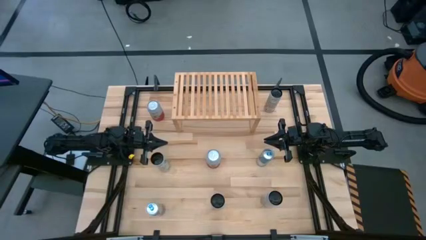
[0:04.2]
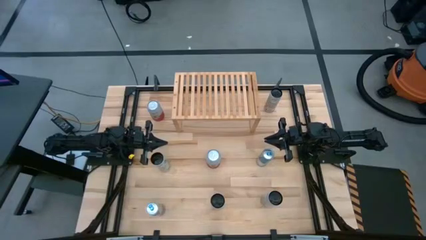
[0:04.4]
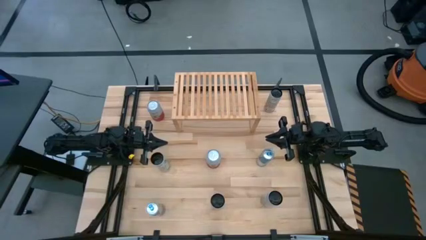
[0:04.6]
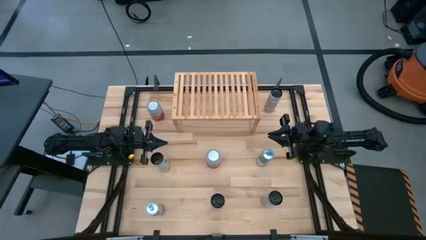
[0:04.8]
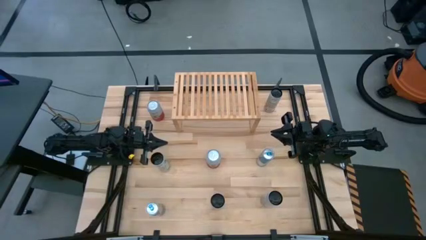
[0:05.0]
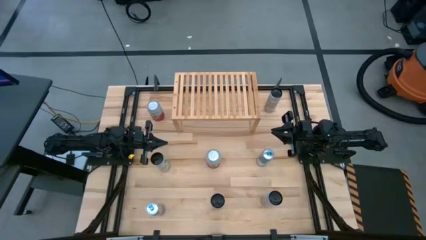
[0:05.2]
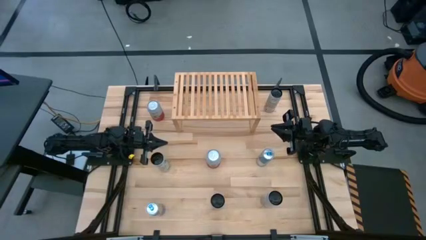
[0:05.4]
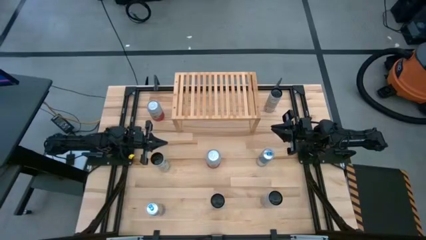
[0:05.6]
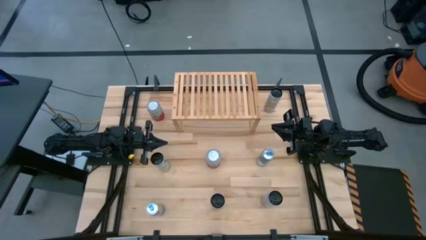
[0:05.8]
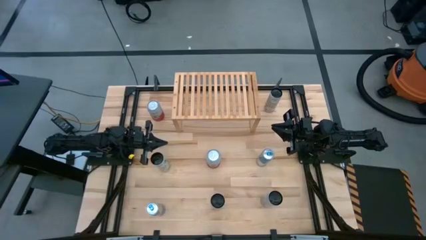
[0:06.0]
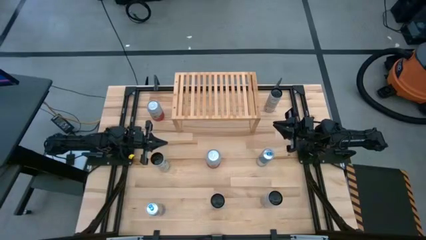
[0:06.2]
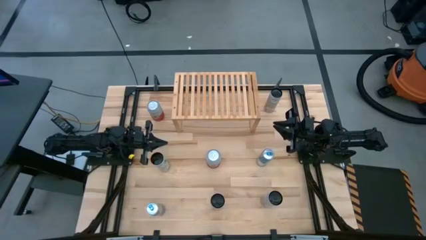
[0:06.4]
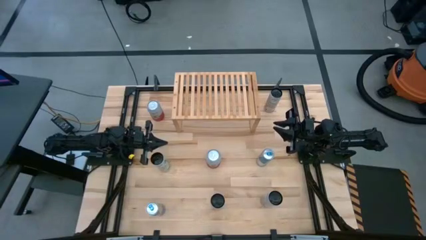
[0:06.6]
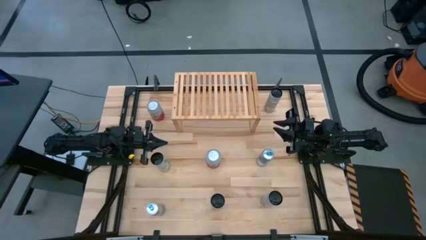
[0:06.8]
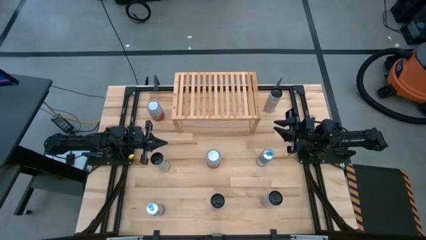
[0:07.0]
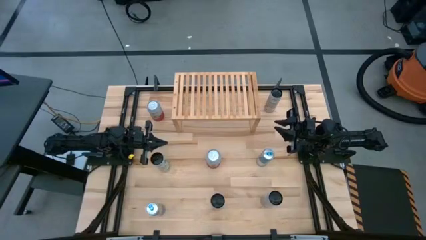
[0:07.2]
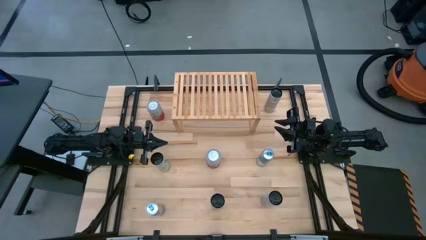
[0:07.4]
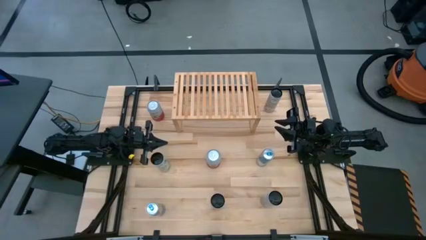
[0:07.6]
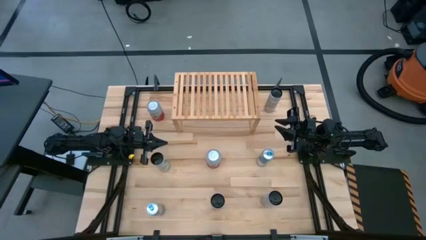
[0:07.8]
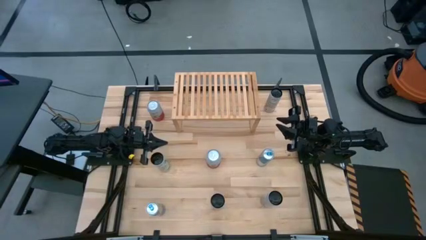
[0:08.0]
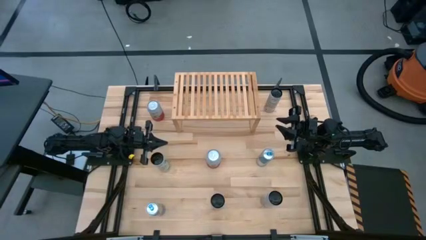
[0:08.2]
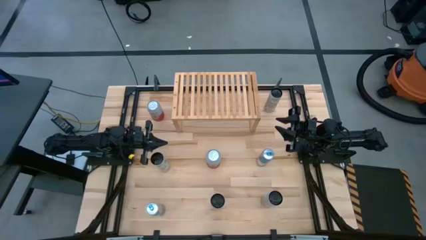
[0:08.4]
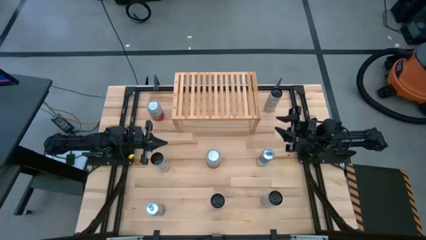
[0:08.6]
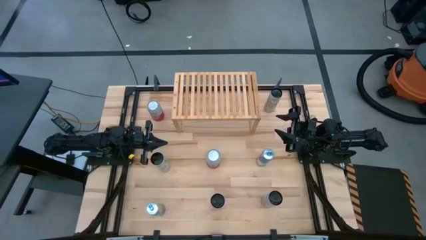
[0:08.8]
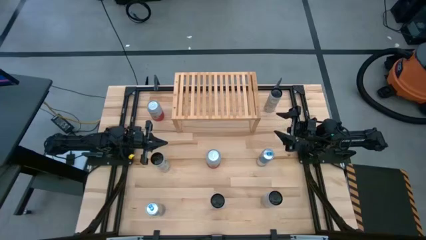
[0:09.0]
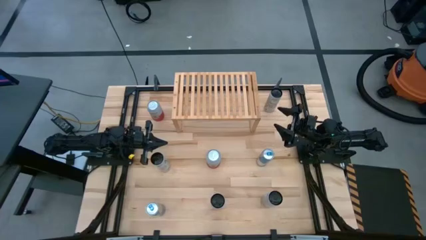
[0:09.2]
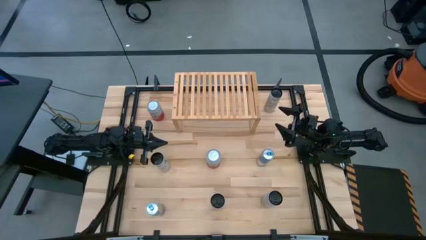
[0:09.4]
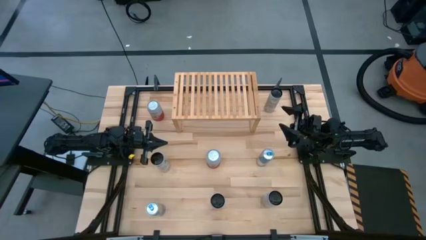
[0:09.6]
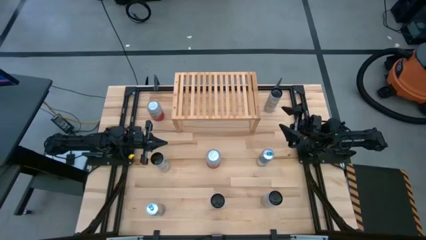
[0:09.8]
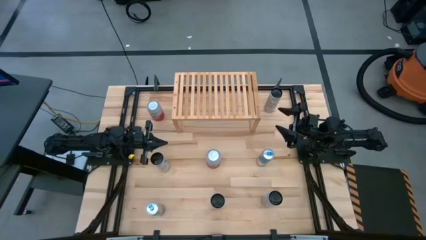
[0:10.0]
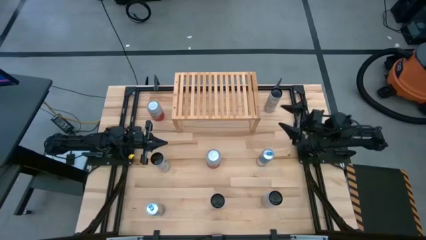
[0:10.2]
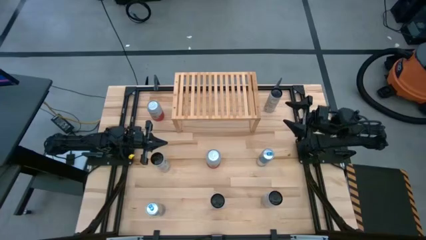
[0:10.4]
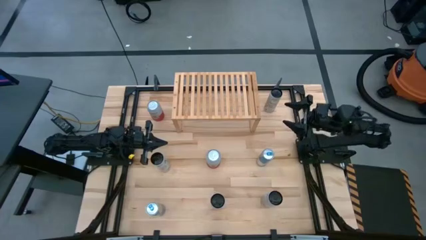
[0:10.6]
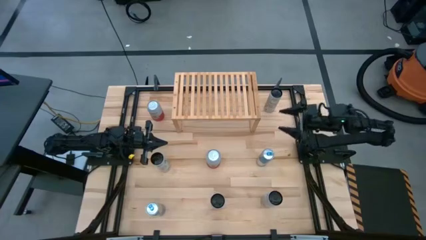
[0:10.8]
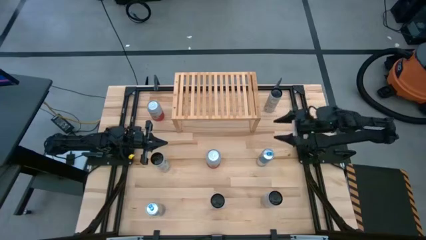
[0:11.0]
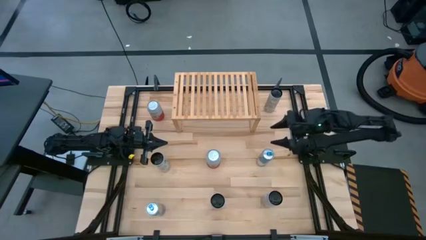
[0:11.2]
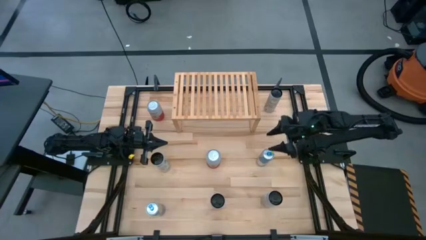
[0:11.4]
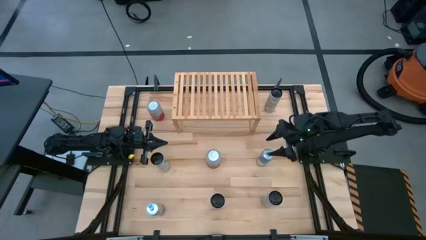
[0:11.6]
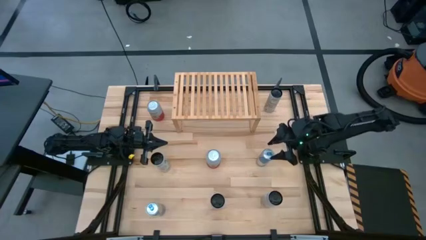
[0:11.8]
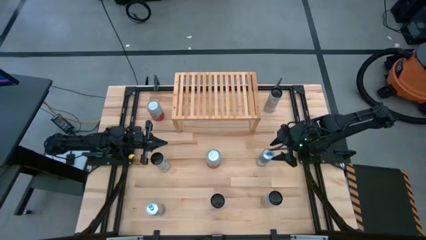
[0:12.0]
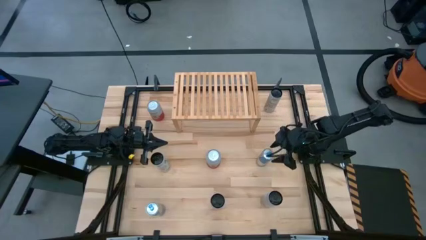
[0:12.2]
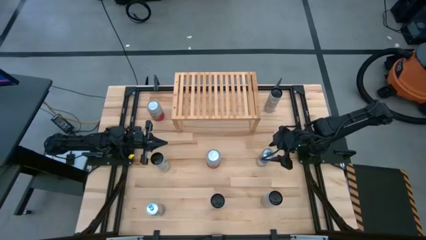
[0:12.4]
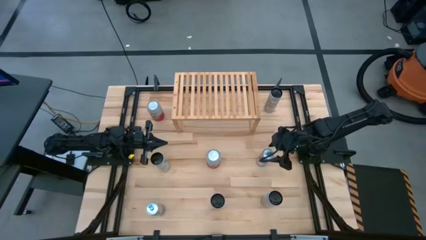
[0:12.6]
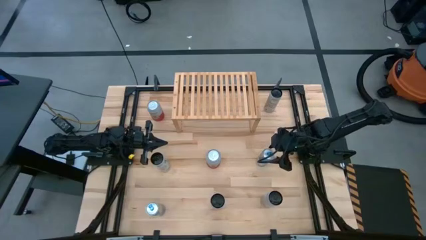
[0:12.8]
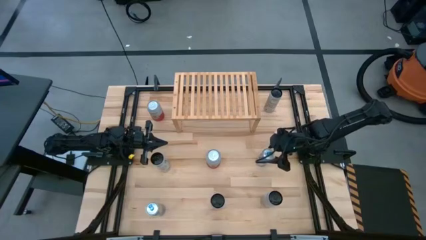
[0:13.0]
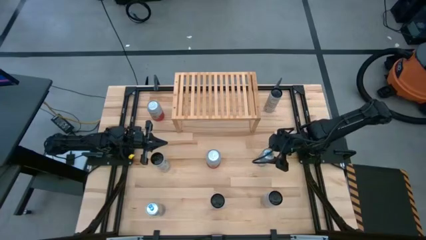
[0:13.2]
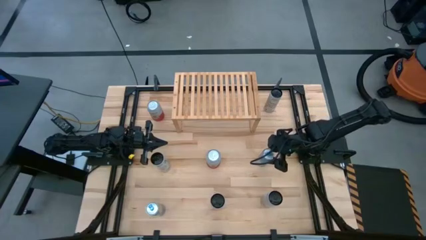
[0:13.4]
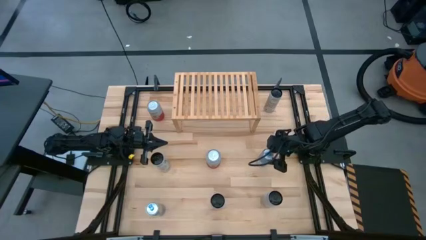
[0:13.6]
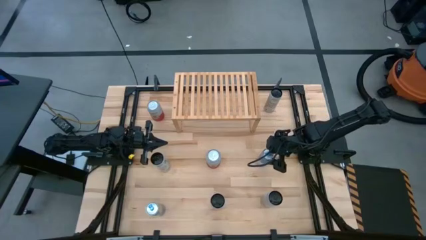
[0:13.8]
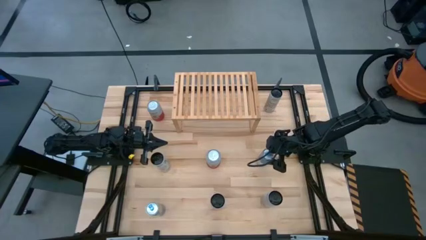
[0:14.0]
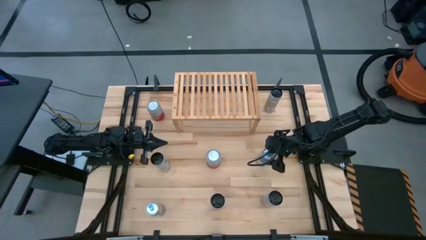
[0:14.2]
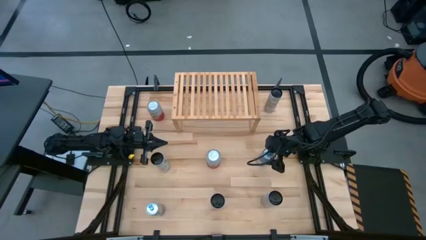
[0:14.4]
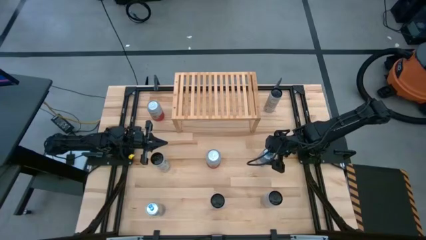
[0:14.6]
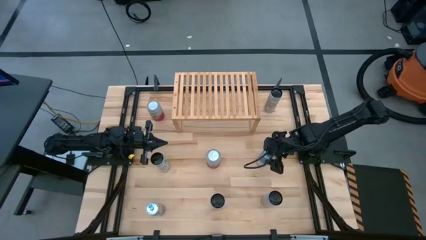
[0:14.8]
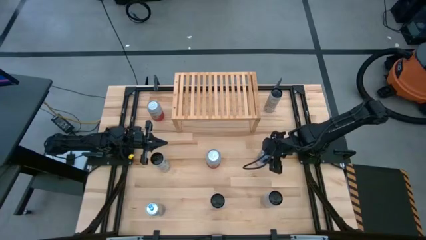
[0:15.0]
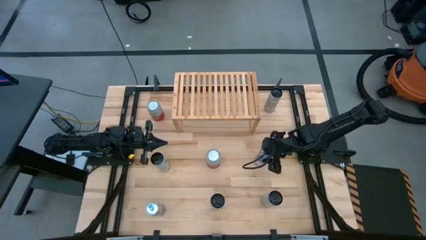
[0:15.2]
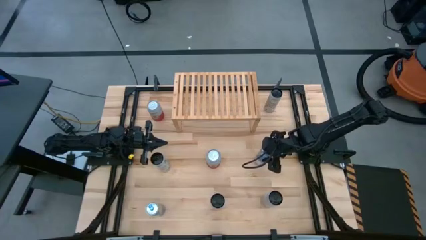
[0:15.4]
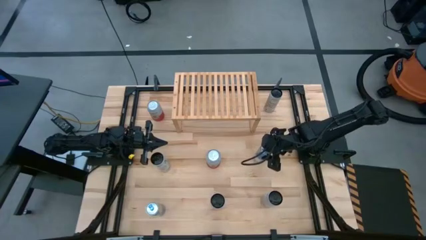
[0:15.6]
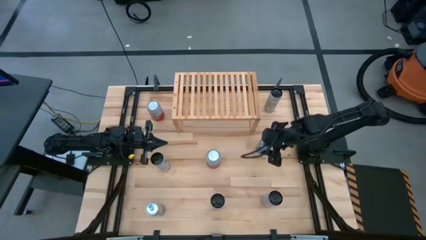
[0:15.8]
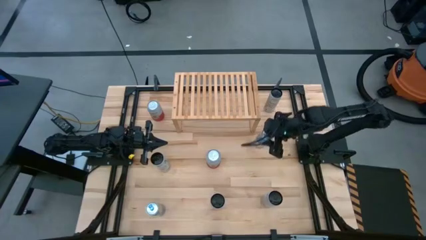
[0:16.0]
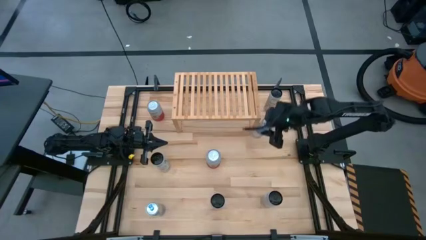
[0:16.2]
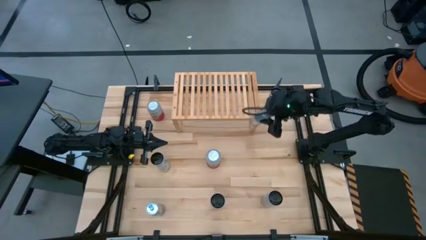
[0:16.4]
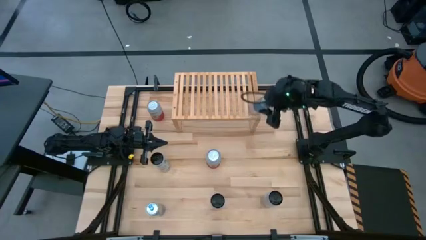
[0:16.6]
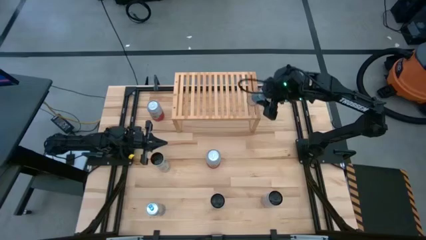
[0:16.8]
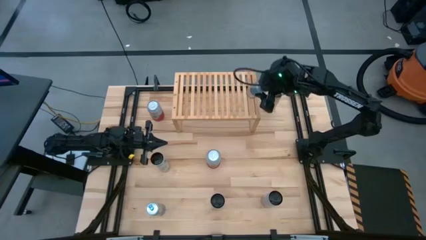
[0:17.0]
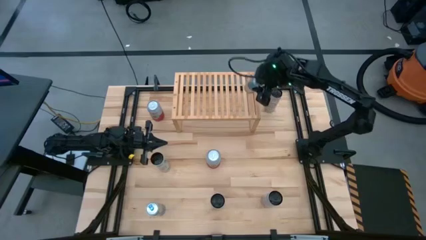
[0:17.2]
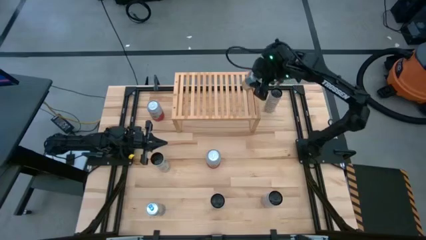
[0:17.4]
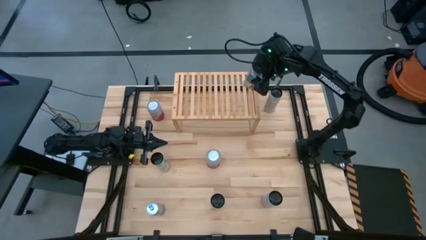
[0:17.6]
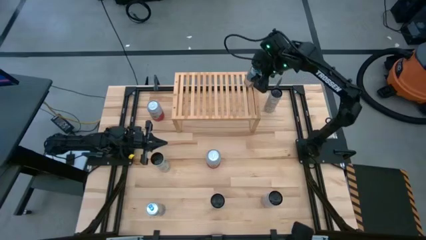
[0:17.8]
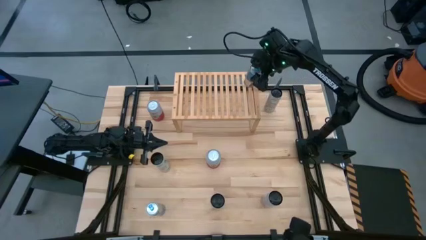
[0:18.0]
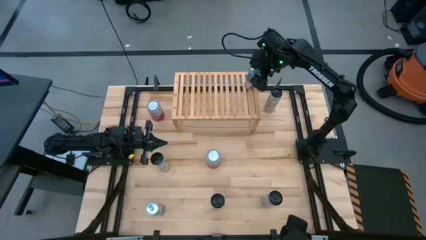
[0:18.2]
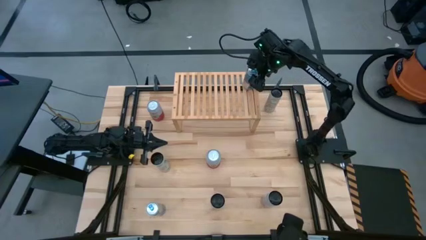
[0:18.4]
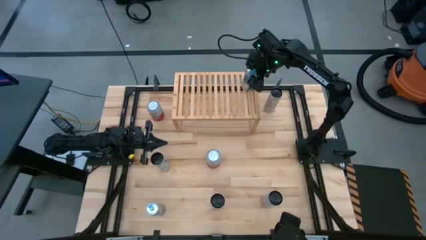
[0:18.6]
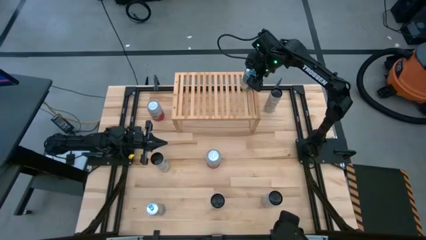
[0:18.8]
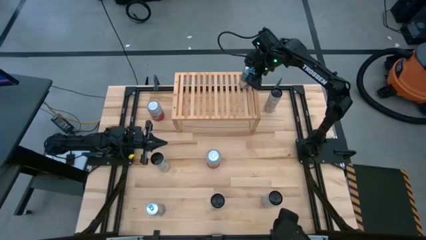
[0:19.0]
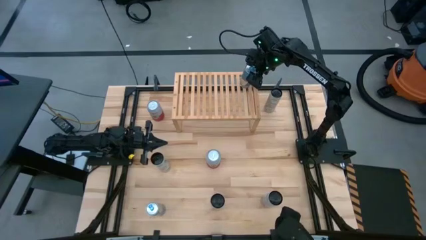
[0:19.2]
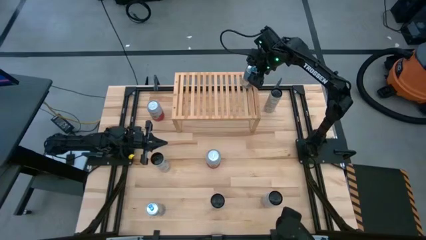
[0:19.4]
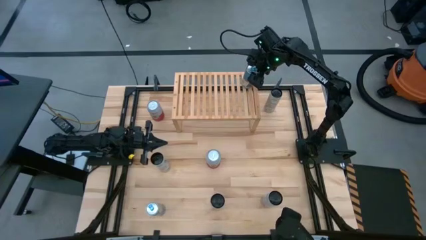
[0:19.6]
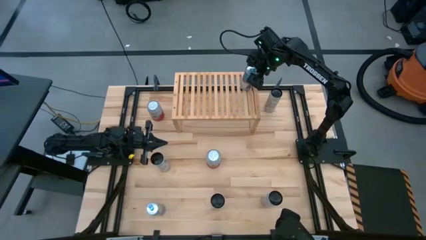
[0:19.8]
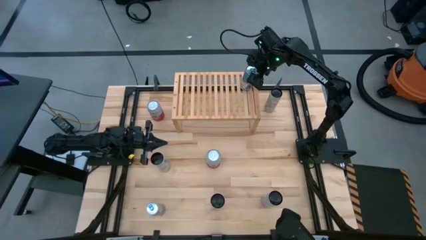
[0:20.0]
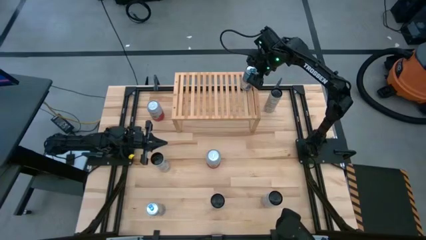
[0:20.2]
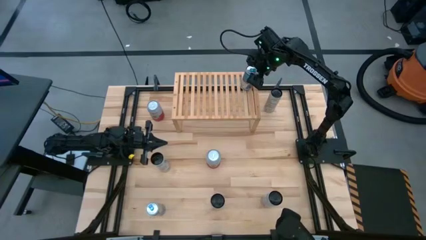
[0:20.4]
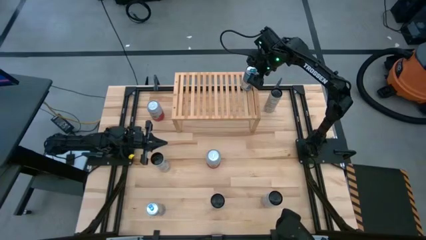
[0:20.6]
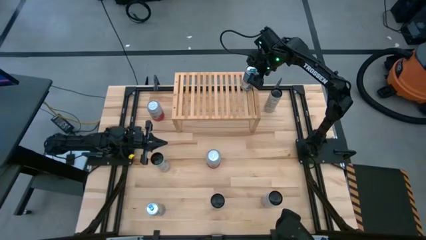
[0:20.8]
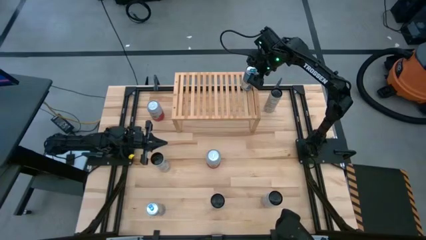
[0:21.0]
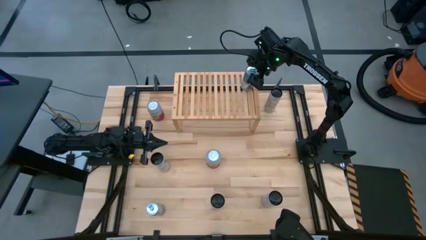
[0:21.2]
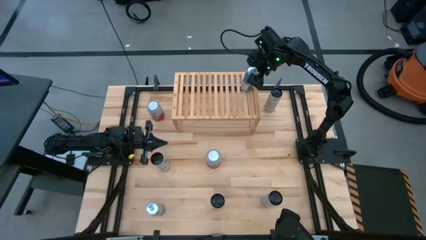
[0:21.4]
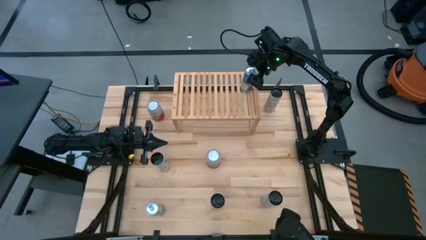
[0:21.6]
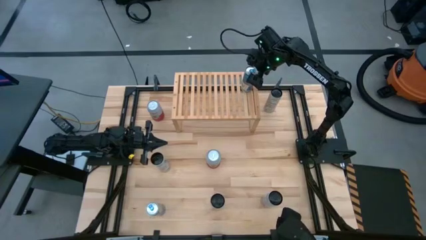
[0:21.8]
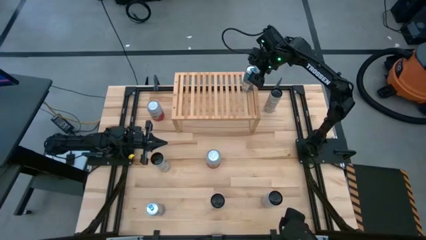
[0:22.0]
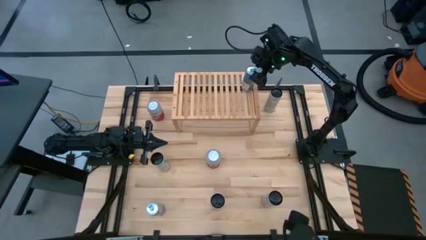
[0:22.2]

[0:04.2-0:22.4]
Task: Place canned beverage on shelf
Put the top blue soda can on the shelf
